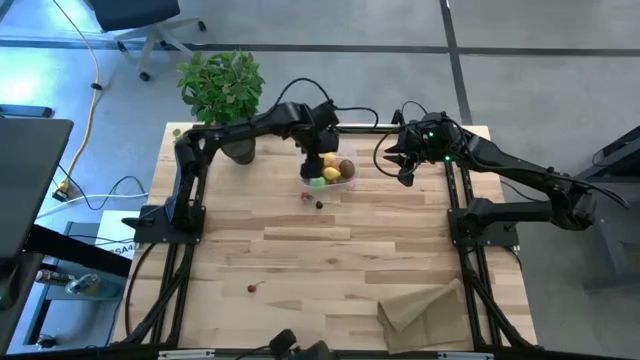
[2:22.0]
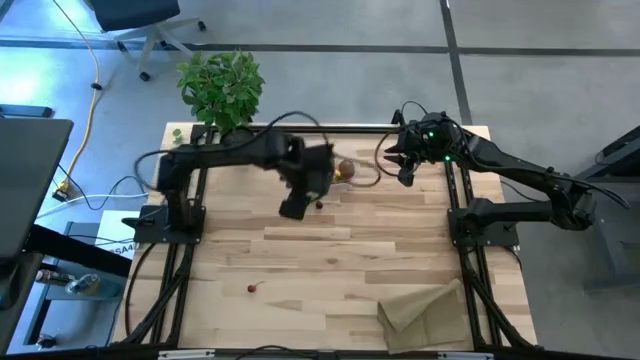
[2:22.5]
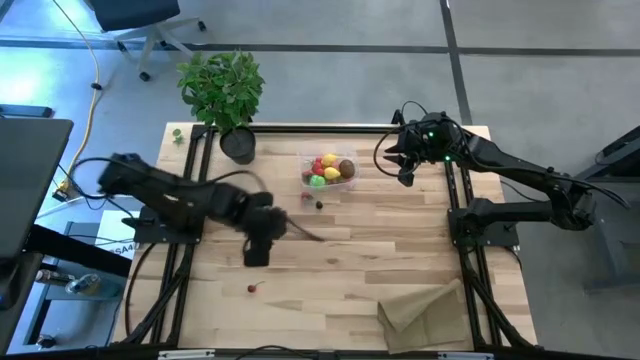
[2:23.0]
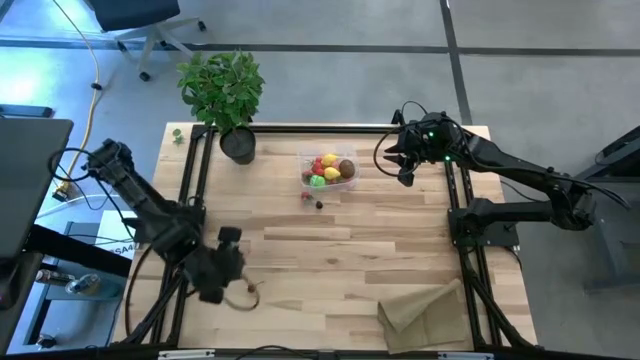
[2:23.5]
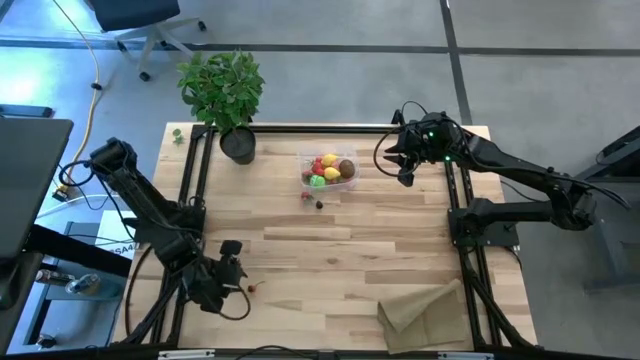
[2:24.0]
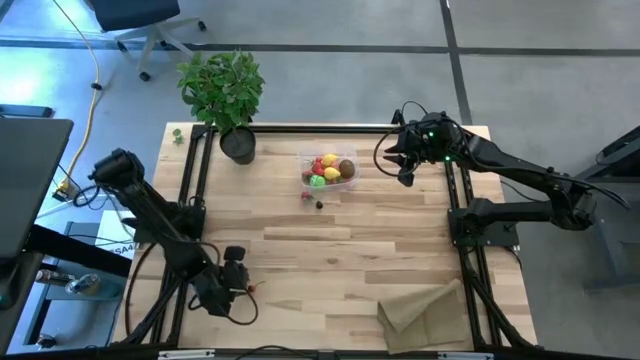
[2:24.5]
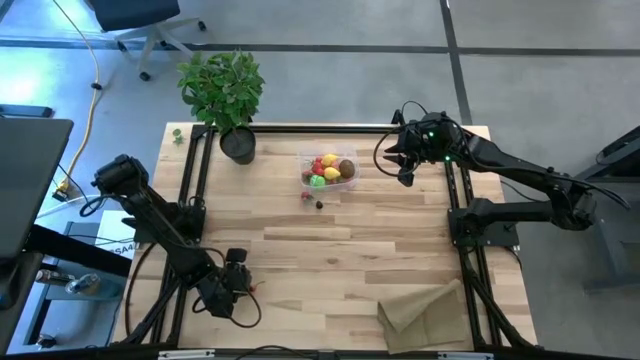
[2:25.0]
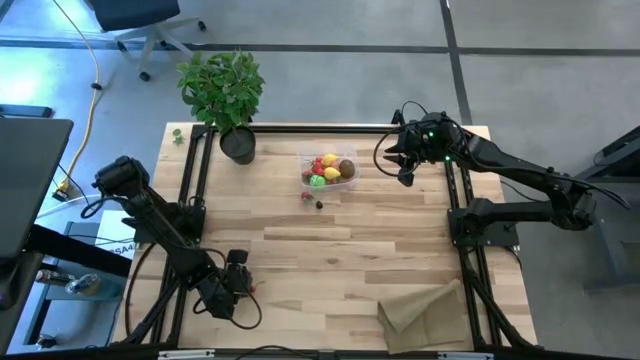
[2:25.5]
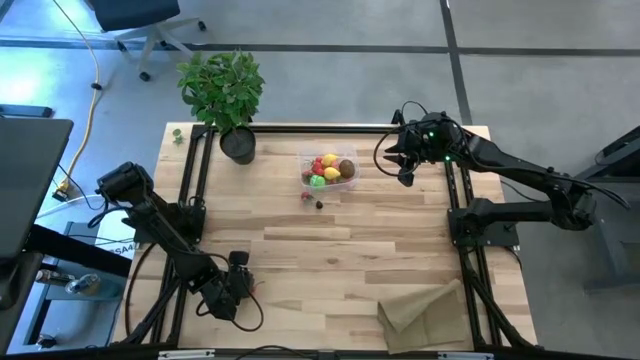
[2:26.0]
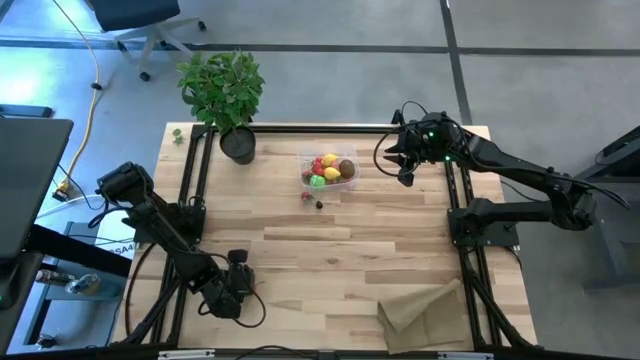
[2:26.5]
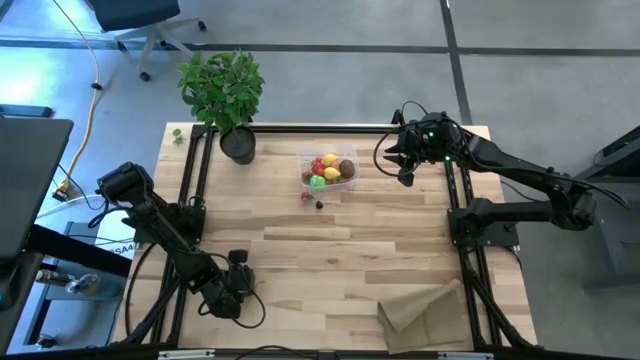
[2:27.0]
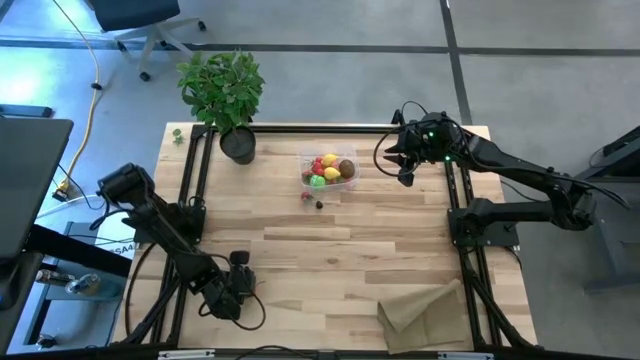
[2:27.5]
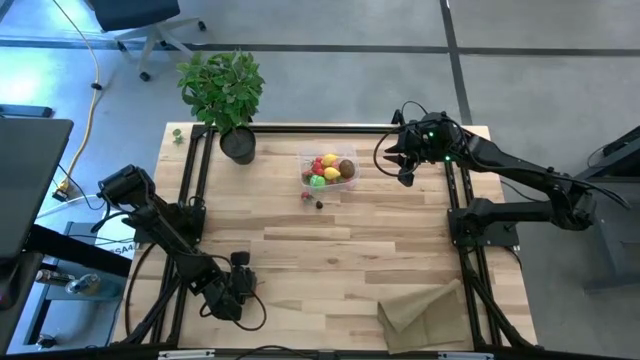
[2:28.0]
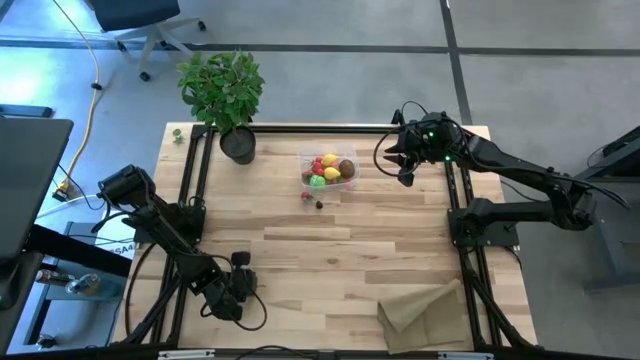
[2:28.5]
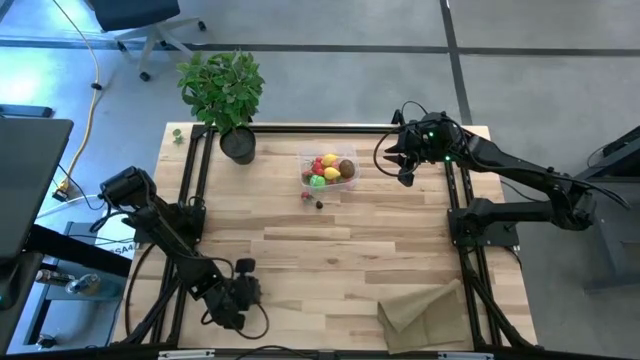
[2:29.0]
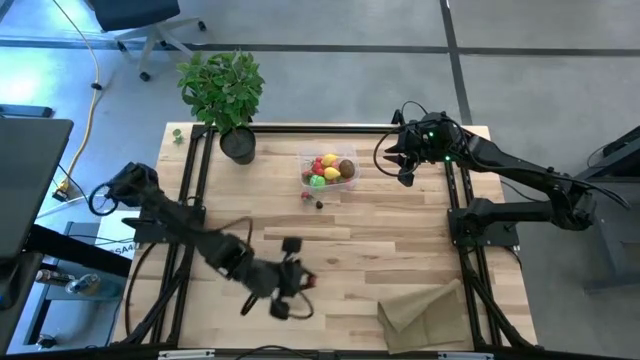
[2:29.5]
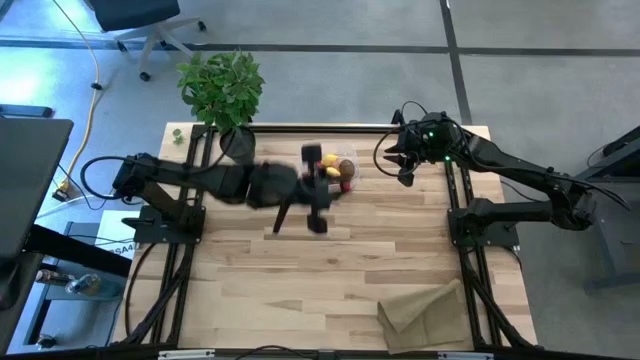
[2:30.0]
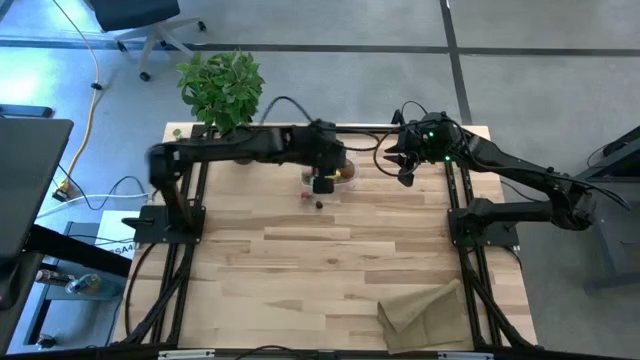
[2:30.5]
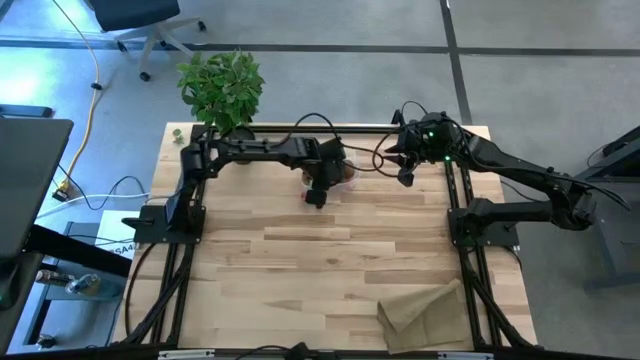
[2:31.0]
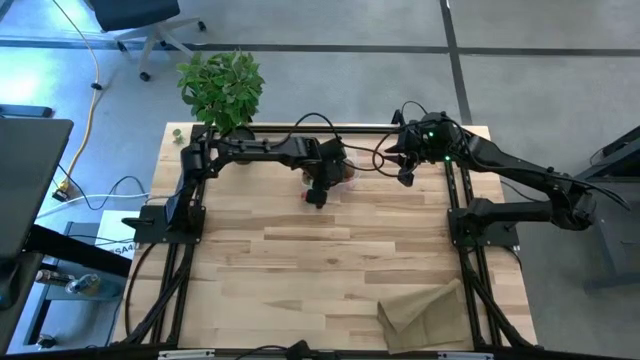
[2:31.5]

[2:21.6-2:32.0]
Task: Pick and placing Produce into tupperware
Put the cherry into the transparent bin

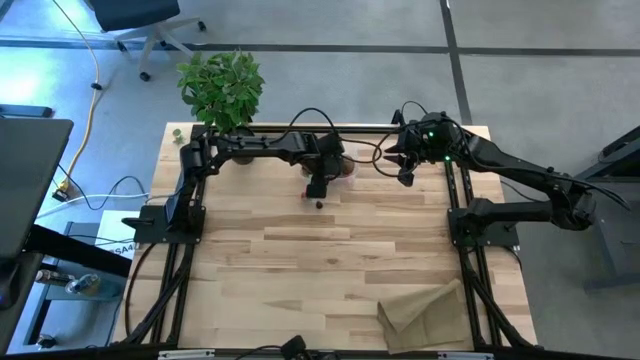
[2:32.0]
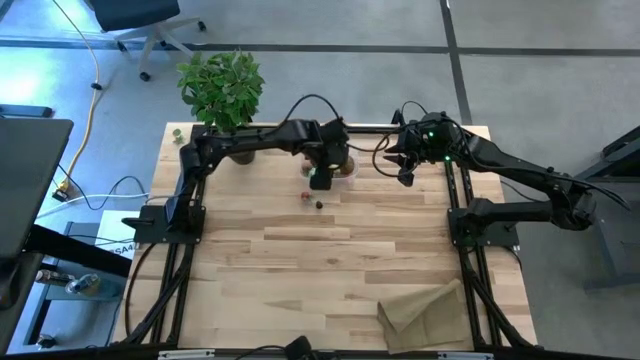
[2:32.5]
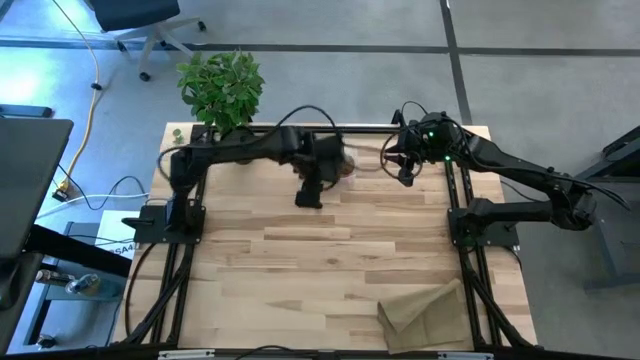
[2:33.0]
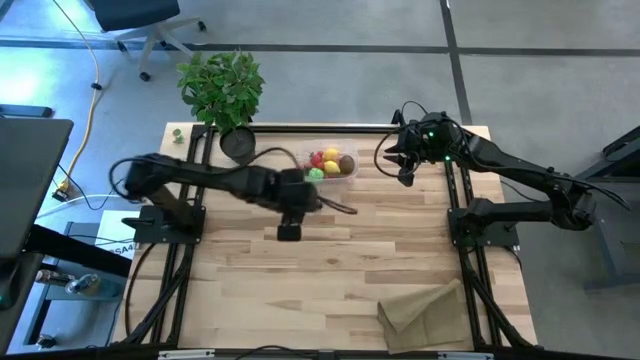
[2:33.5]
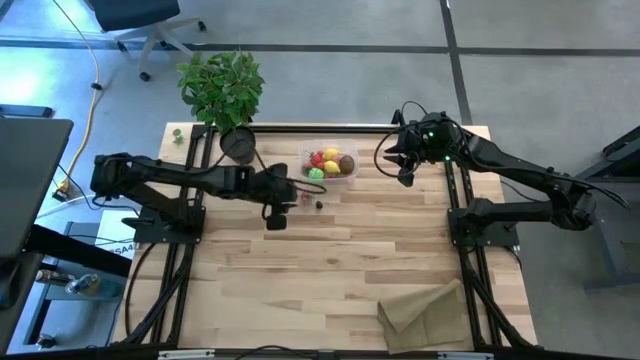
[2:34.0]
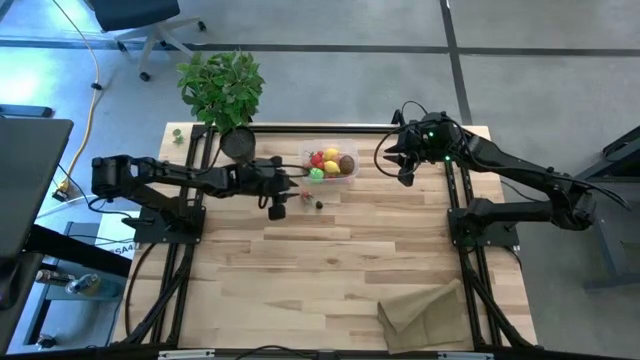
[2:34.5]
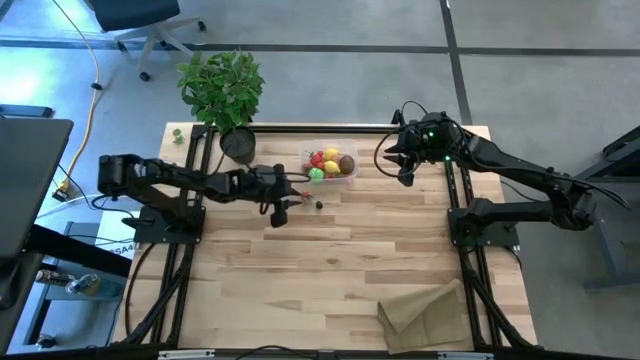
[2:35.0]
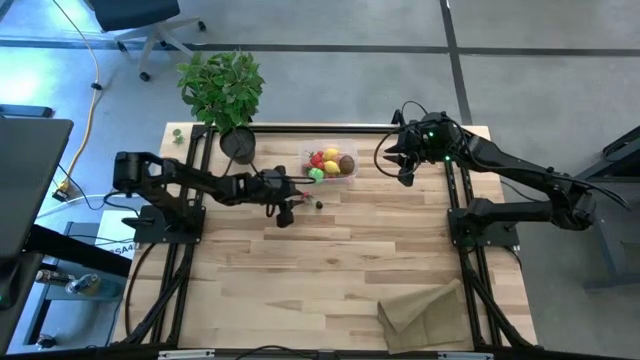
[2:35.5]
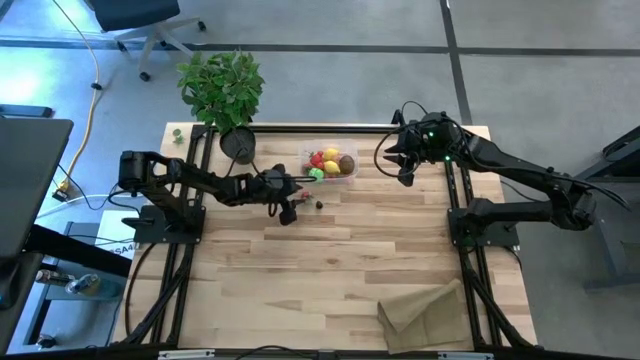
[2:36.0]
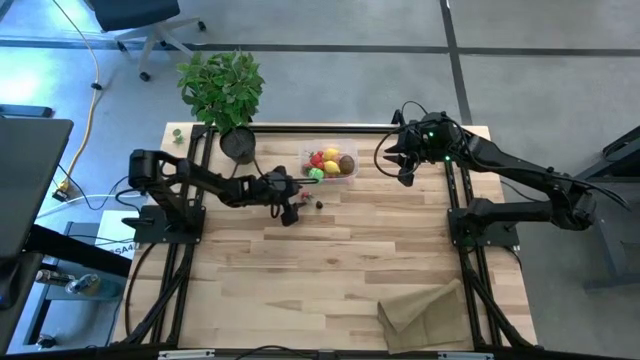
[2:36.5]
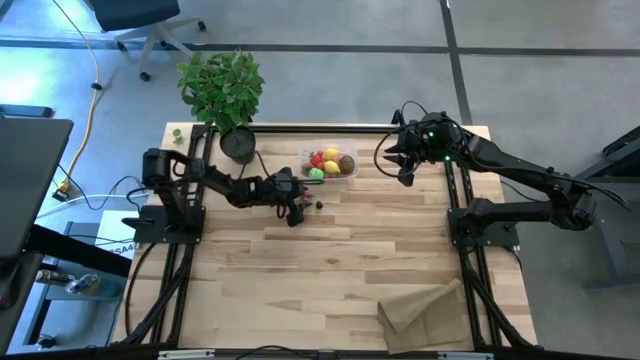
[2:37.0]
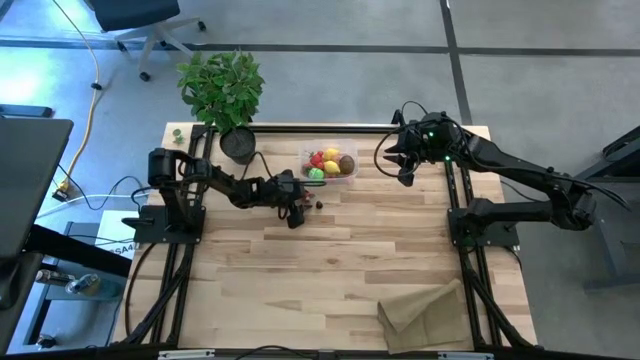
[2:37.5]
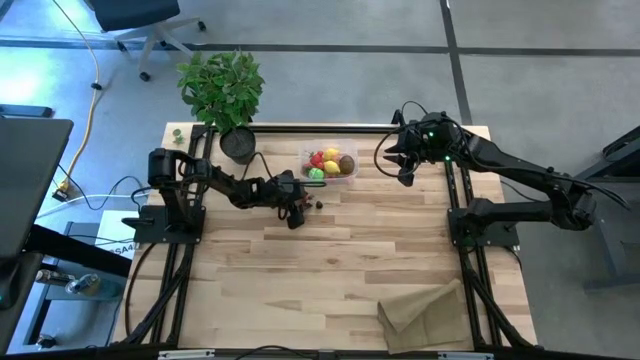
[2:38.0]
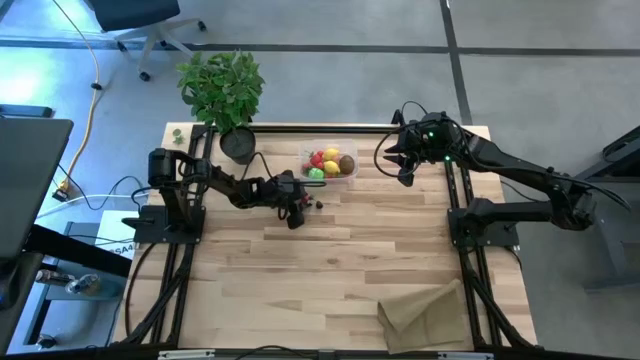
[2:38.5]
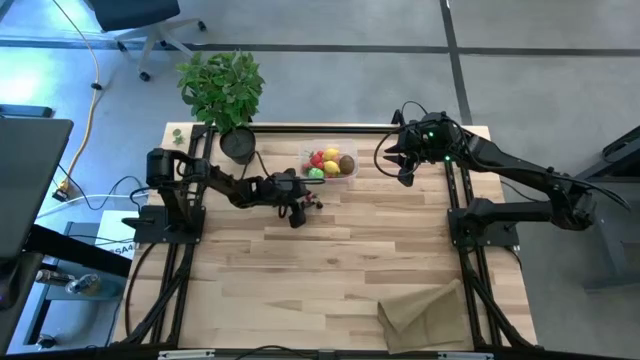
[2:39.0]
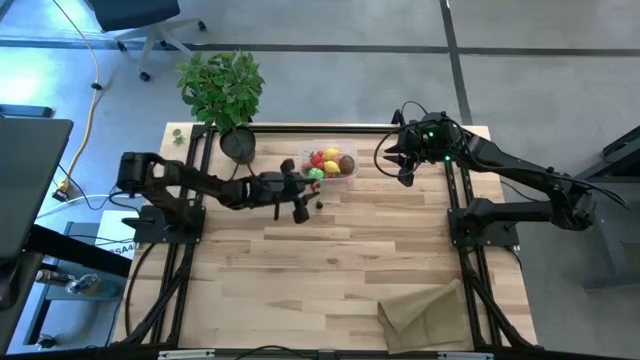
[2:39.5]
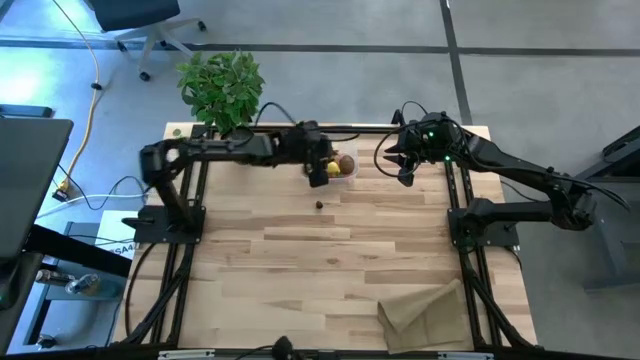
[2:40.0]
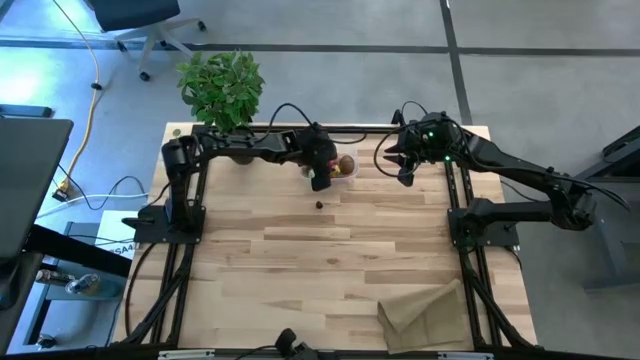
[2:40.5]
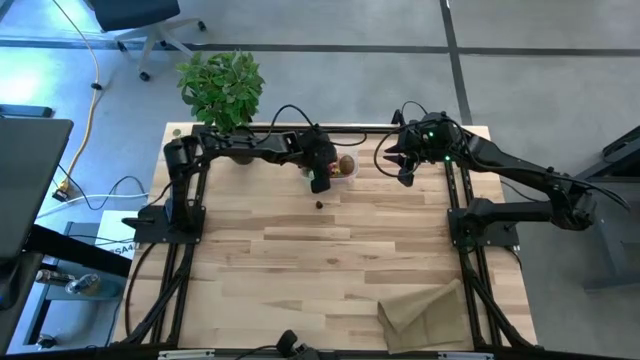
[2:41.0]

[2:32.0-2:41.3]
Put the strawberry into the transparent bin

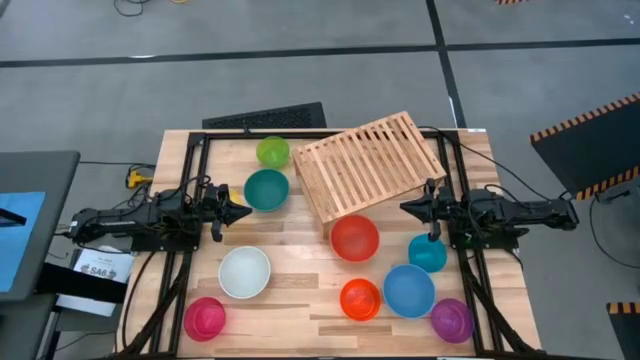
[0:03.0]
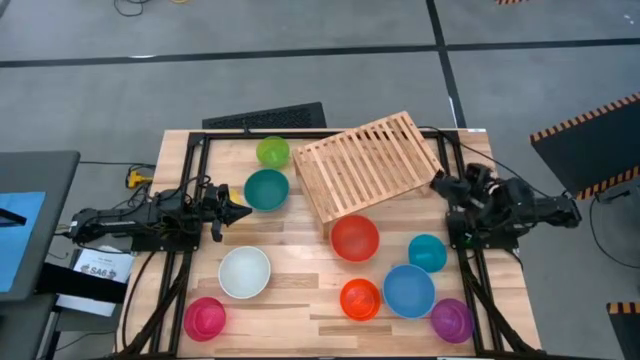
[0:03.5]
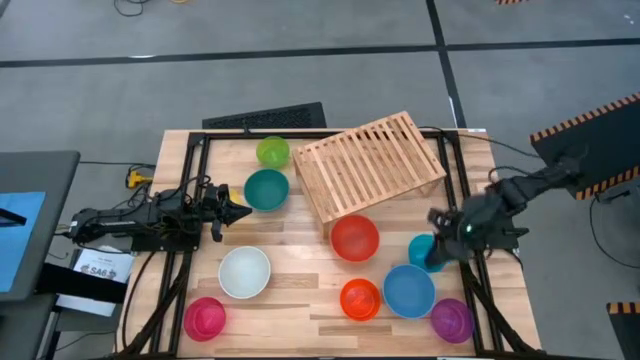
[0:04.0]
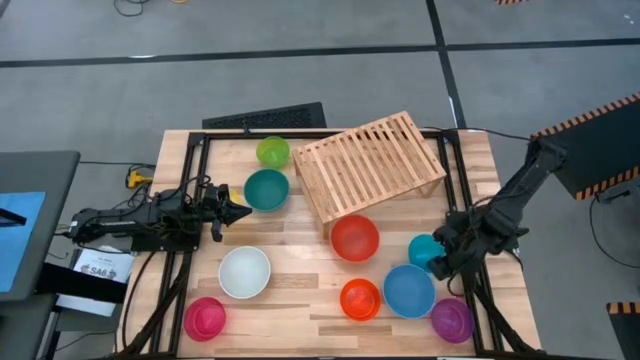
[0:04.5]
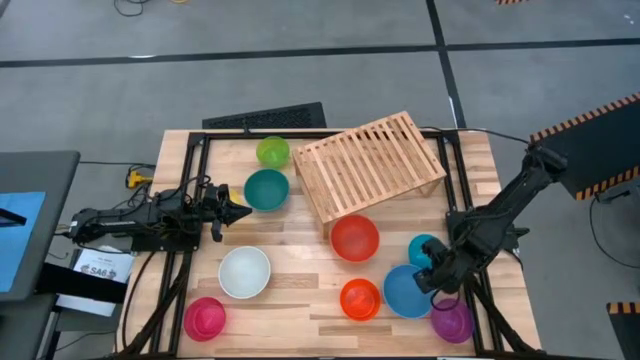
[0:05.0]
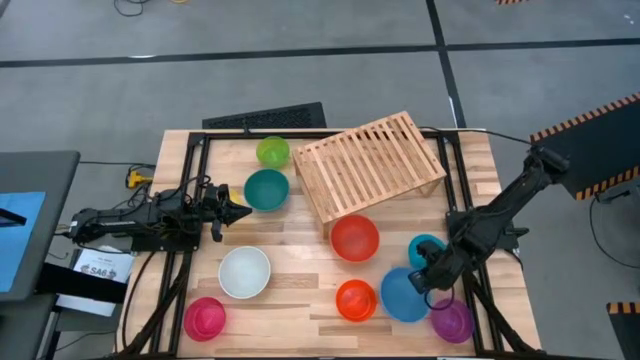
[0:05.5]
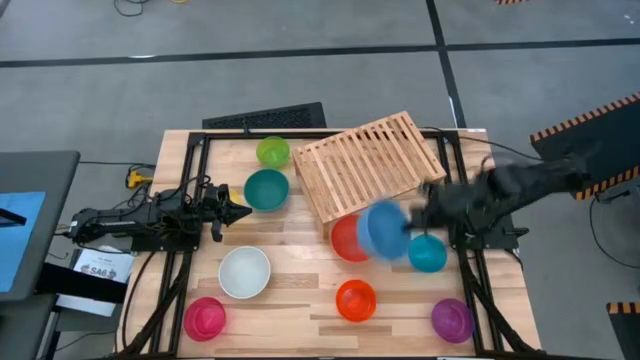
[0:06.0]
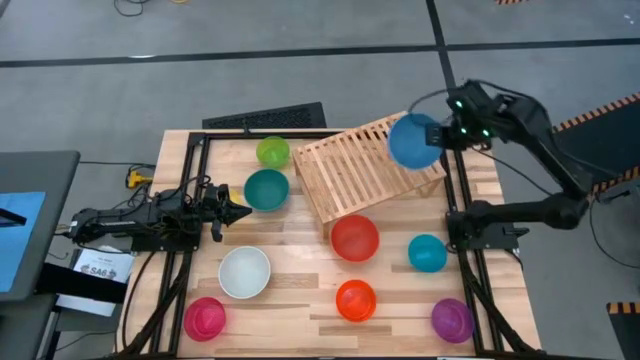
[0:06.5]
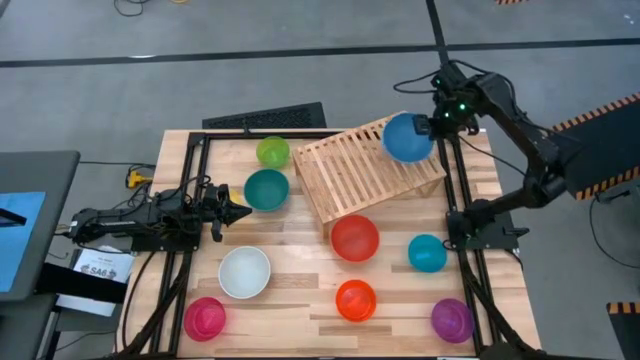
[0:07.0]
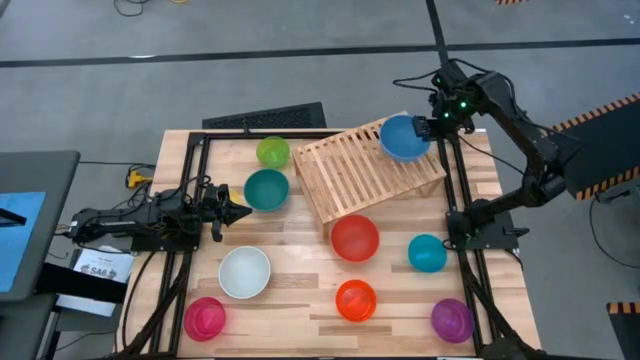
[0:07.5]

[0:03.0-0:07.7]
Task: Place and stack bowls onto a shelf
Put the large blue bowl on the shelf
